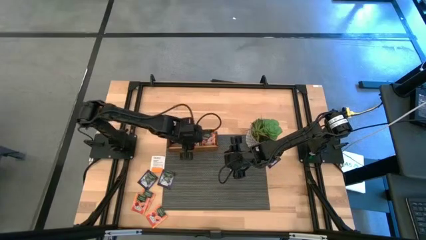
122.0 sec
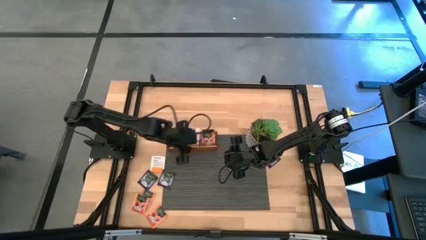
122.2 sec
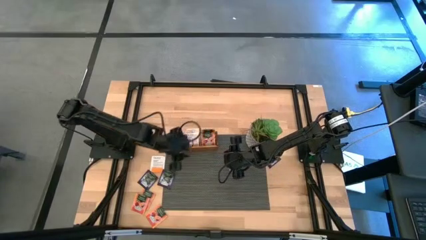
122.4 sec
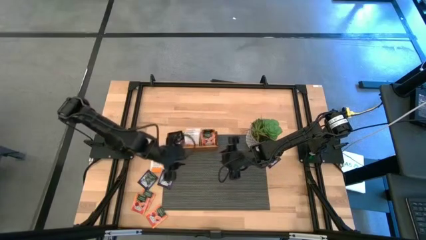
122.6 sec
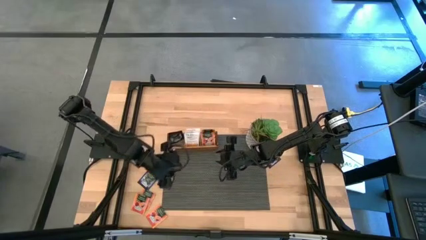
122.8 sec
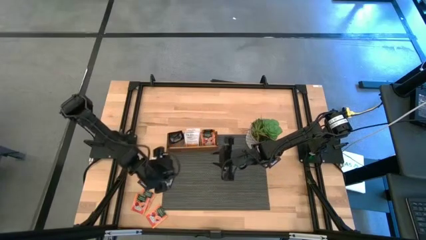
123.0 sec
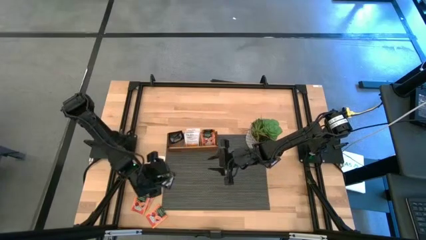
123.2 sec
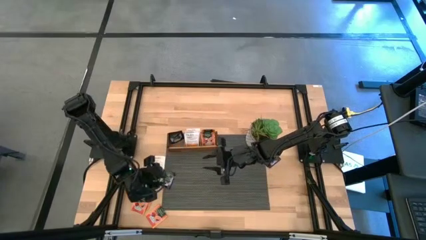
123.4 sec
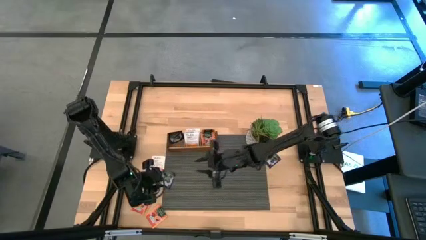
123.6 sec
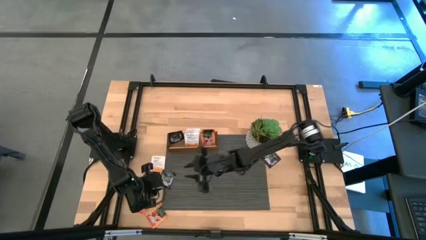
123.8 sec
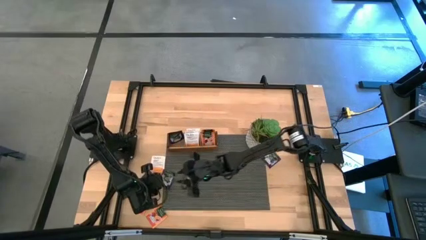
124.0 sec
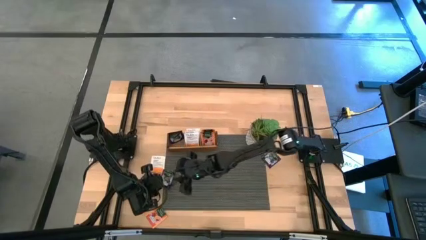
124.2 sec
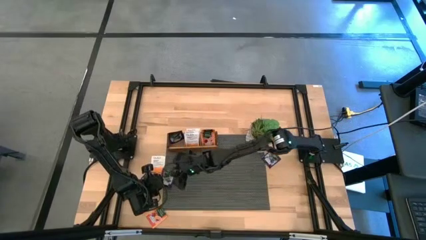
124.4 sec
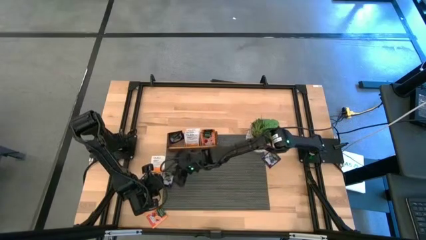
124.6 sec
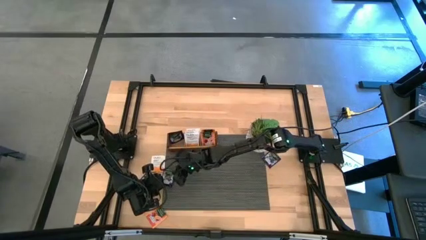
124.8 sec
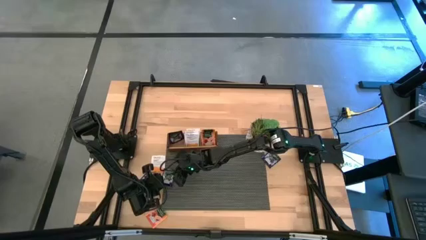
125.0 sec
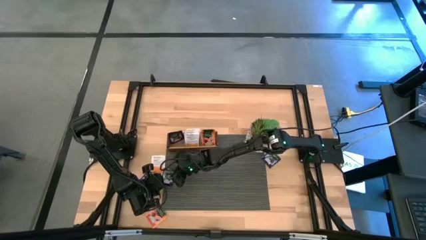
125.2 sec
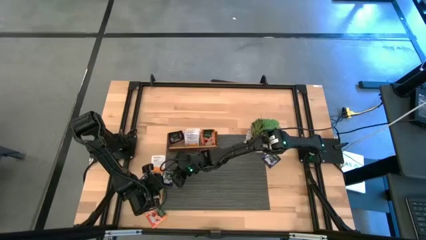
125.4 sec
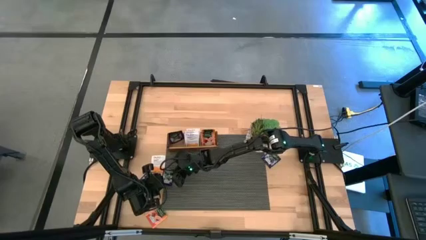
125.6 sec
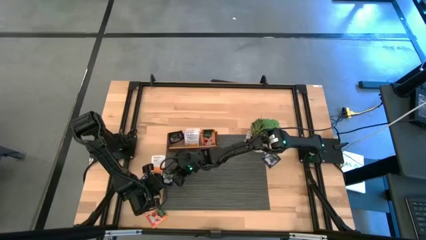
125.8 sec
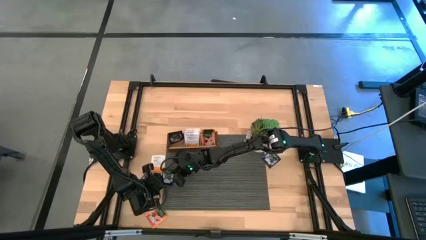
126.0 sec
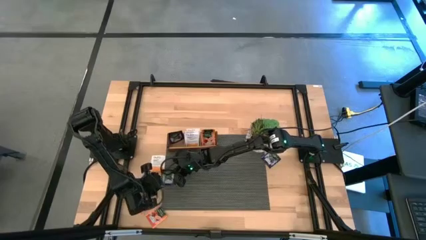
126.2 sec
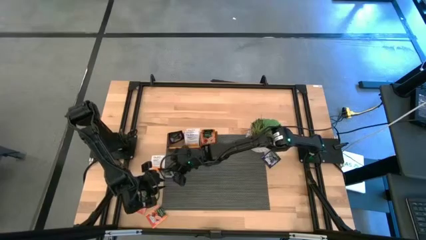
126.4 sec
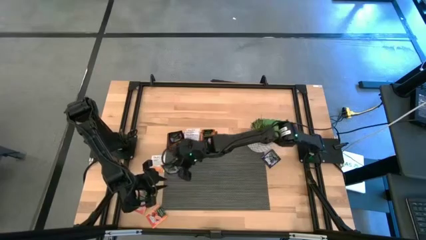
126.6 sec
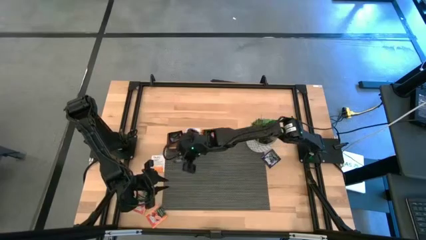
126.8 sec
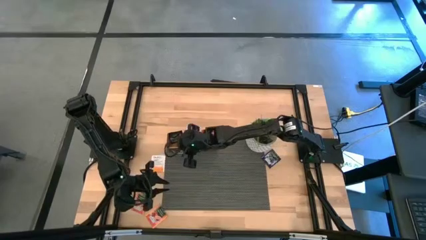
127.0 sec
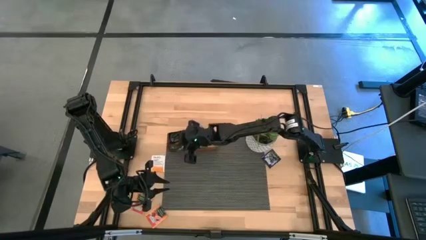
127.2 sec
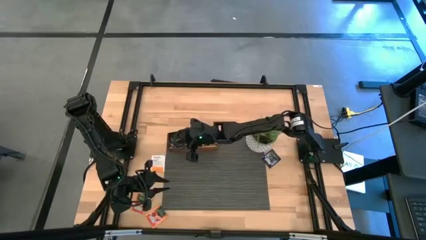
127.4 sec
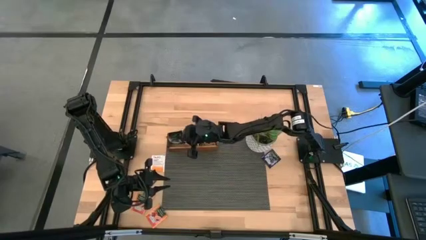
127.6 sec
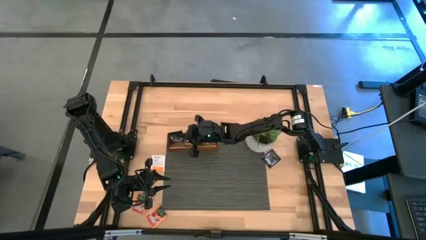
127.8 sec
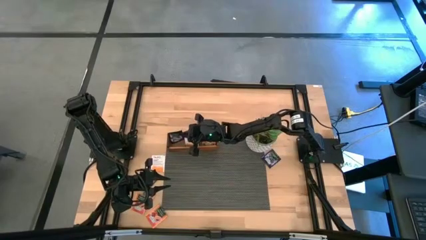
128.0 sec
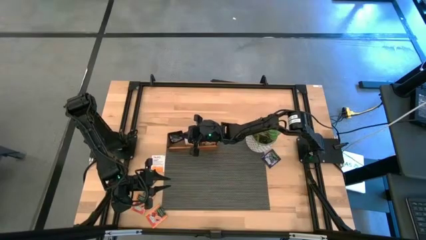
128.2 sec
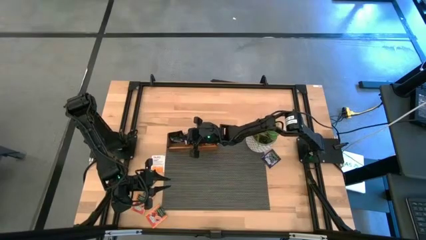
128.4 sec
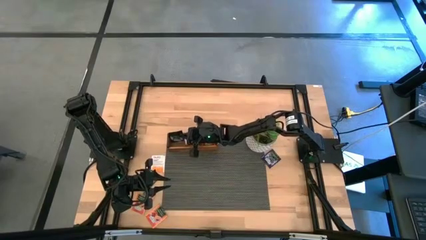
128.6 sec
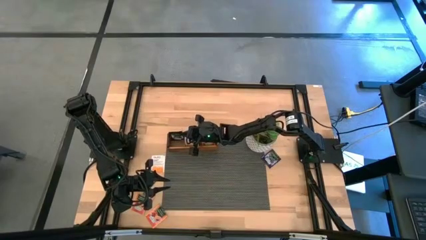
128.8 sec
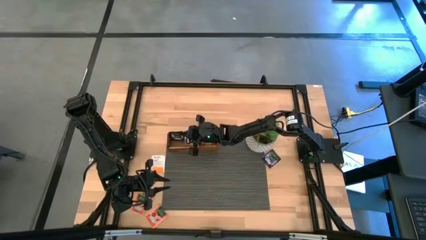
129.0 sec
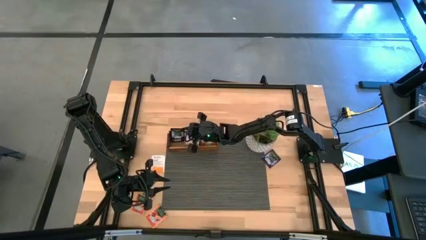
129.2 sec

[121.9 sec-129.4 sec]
Task: Pick & Place Tea
Put the violet tea bag to the left section of the wooden organizer

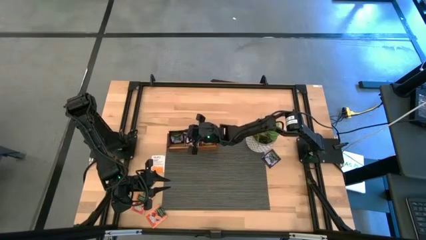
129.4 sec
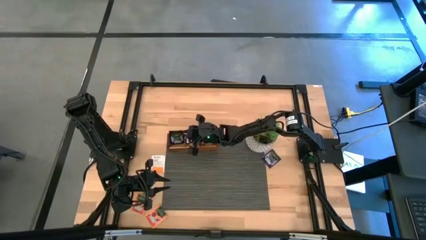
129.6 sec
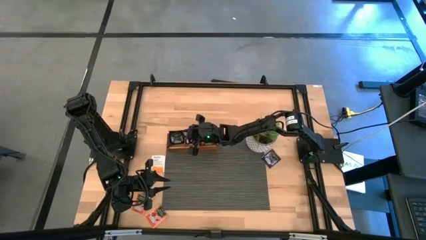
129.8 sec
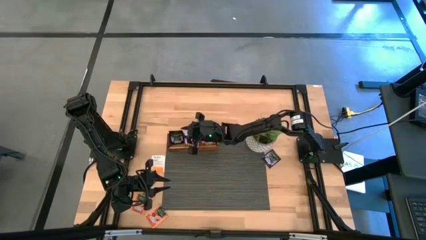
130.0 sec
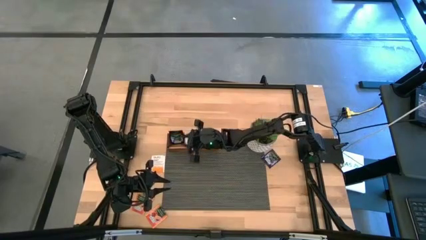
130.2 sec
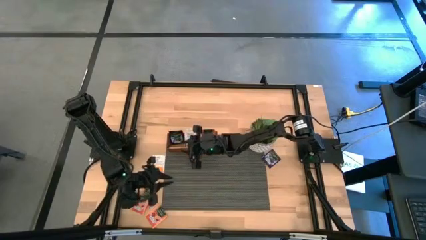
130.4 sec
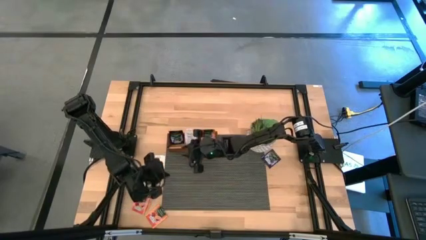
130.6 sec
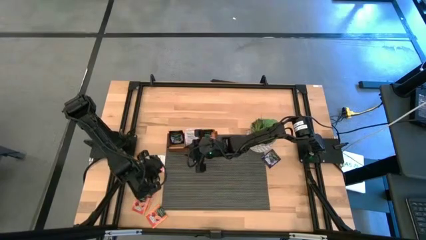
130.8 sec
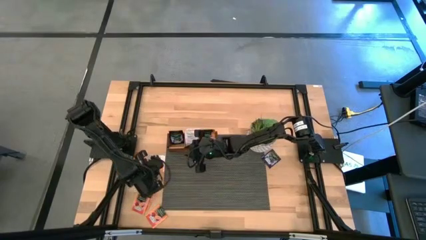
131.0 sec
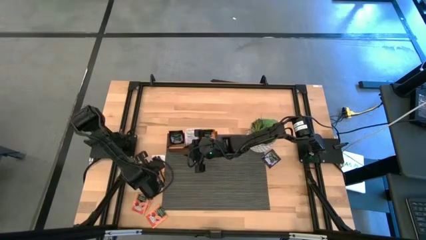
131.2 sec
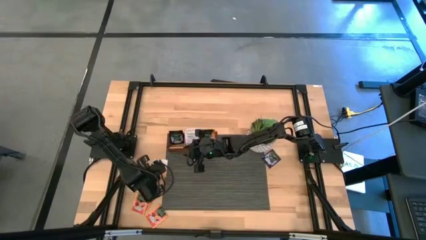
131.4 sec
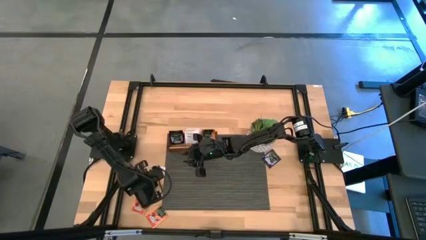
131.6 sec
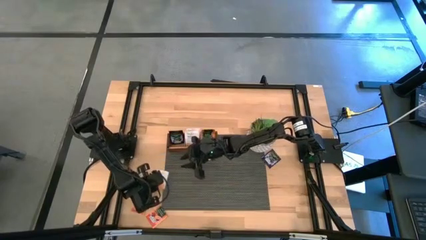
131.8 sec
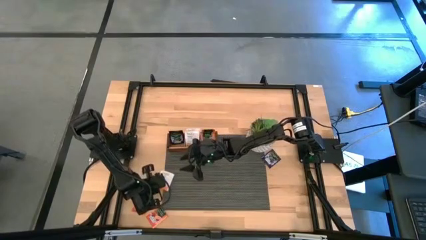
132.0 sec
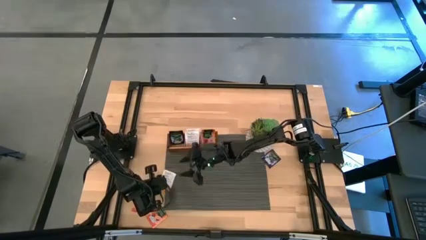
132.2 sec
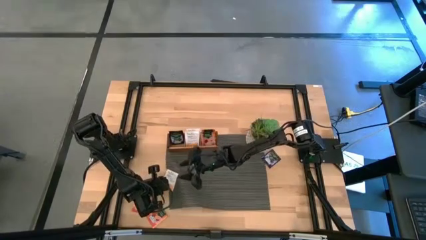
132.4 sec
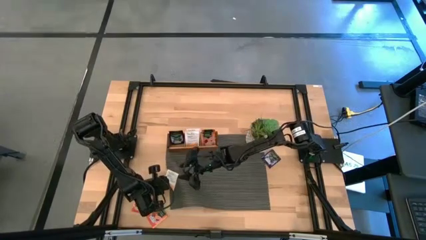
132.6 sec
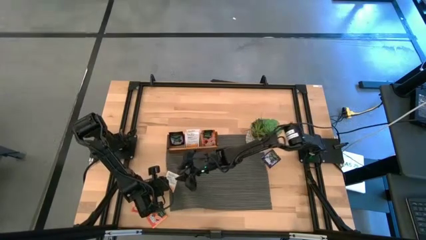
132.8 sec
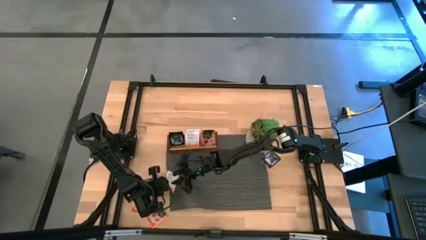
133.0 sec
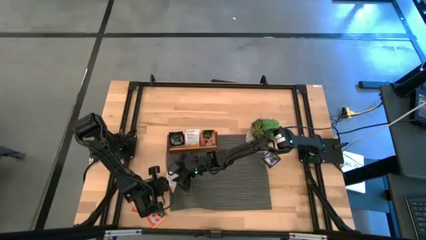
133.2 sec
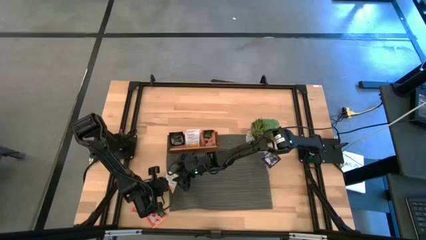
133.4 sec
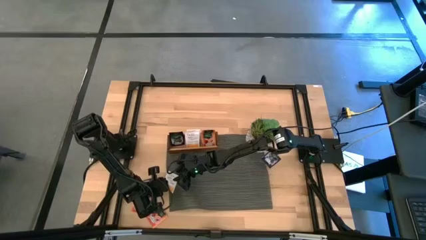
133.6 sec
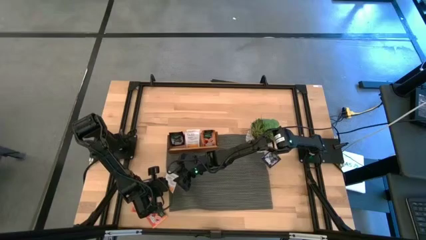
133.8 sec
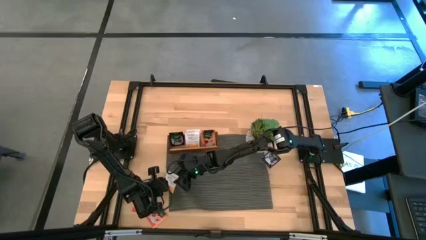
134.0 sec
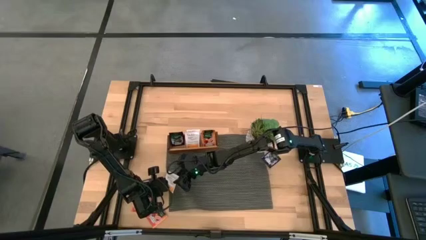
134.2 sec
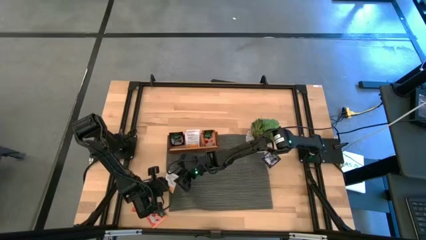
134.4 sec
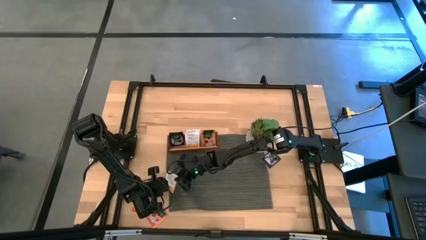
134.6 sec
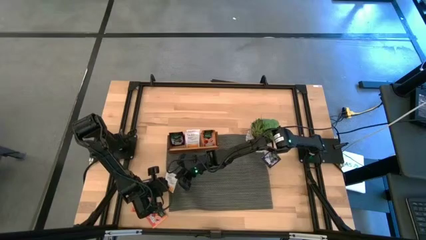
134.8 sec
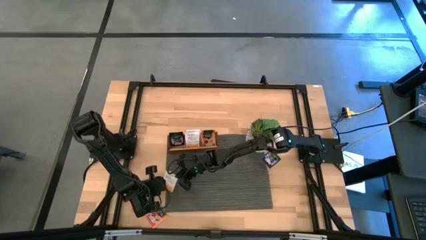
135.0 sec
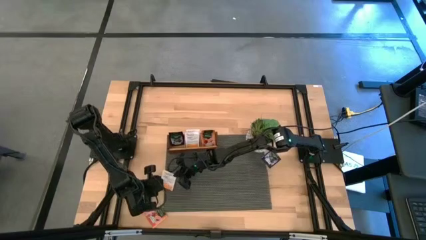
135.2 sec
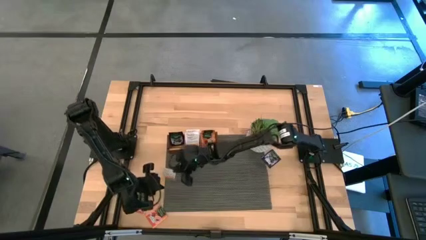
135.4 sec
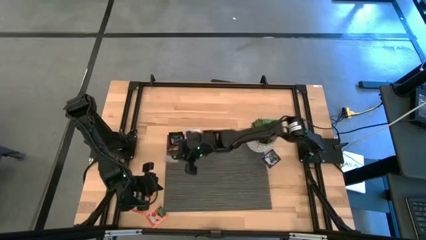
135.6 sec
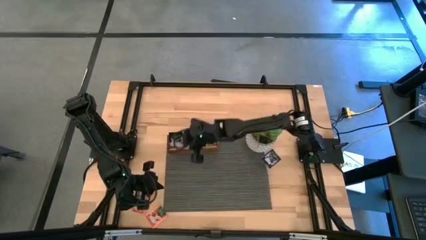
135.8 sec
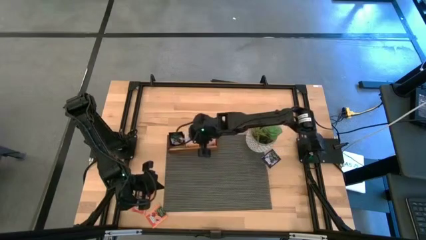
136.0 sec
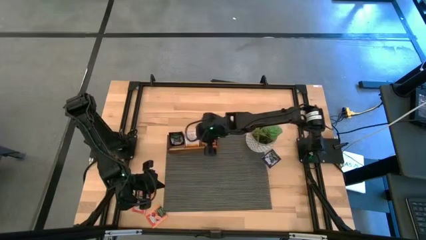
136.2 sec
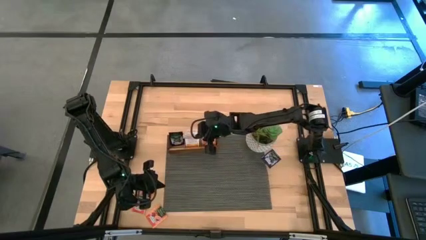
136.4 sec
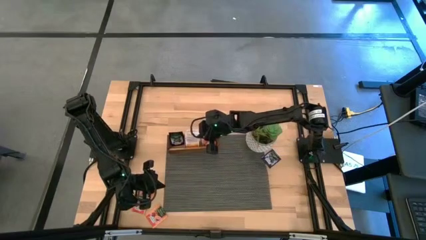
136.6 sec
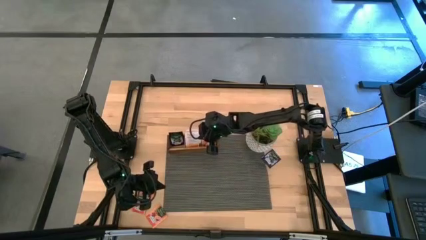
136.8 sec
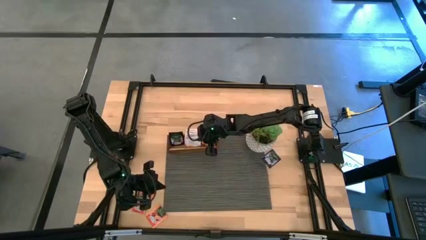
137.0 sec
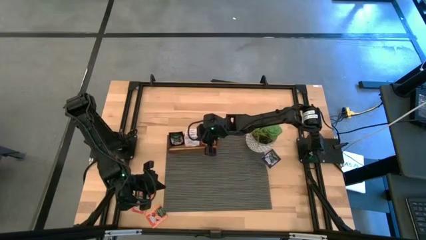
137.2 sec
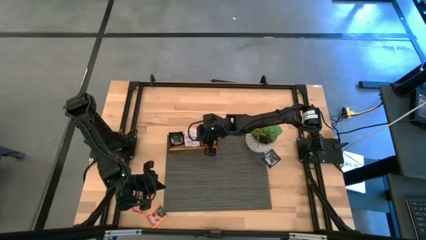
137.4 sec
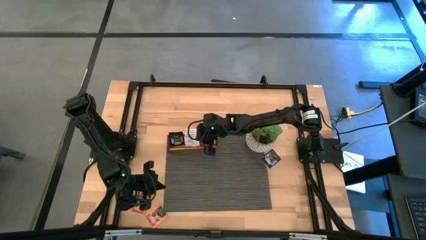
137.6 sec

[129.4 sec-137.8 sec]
Put the white tea bag to the middle section of the wooden organizer

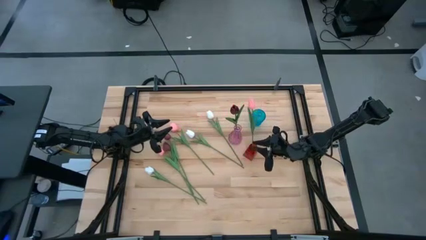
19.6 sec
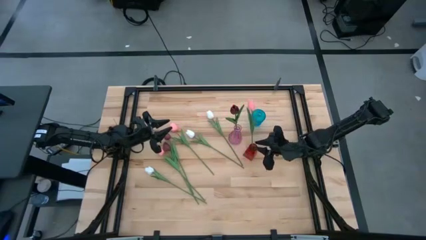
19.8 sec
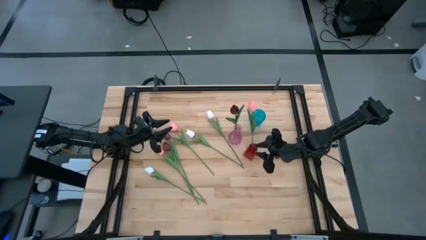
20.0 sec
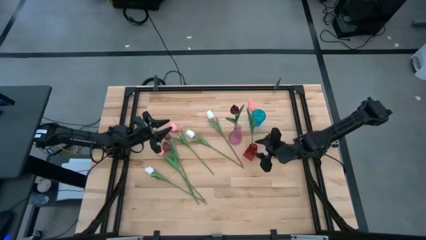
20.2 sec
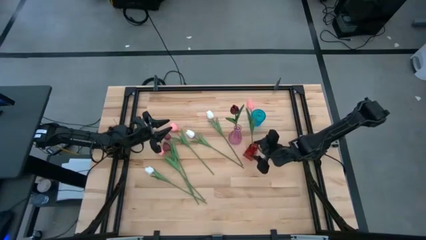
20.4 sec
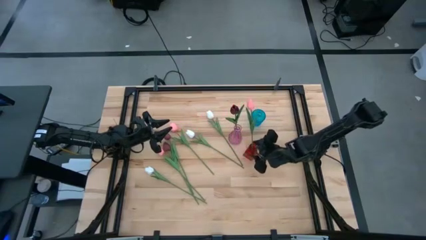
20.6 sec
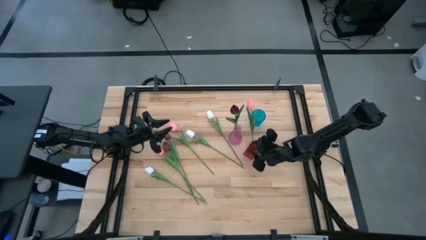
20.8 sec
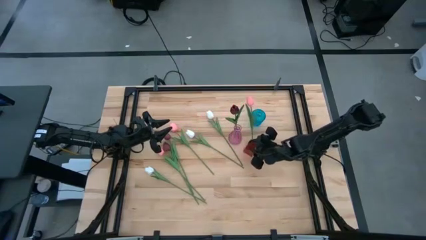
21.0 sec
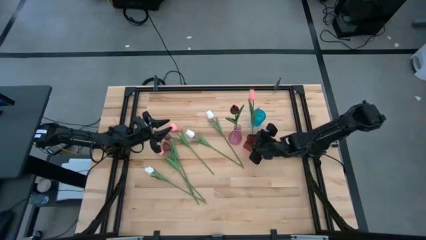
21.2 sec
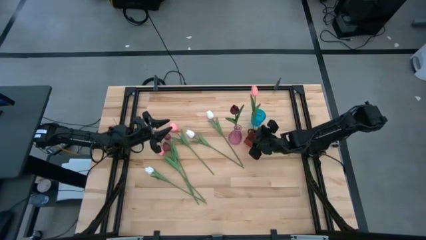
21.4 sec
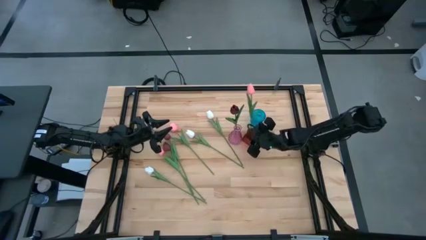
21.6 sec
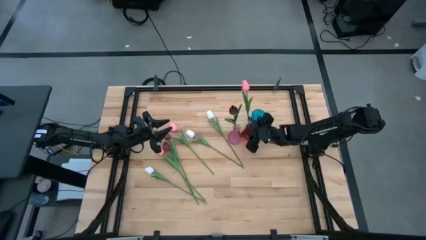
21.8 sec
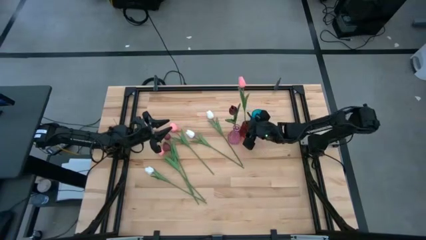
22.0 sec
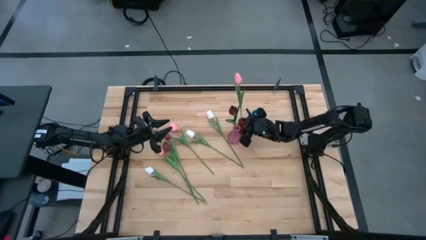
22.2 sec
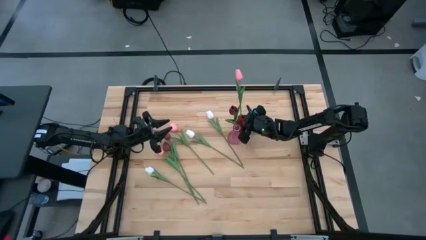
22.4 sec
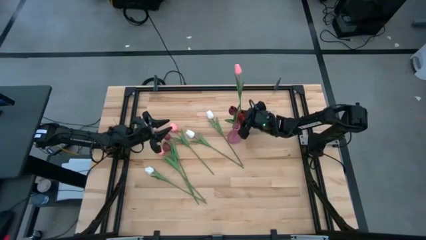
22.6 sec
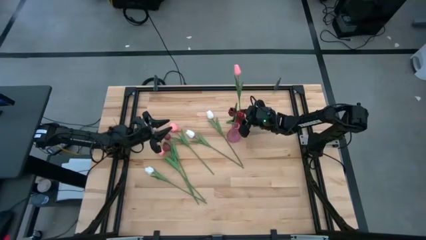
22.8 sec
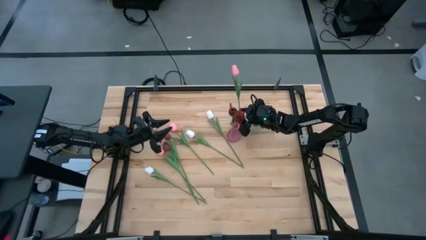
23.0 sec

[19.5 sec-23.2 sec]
Task: Sort flowers into vase by color
Move the red vase to the center between the pink and blue vases
